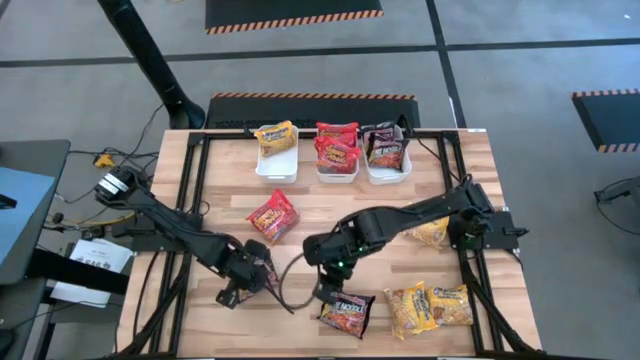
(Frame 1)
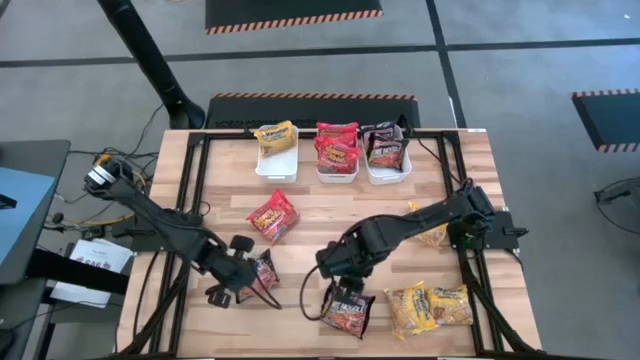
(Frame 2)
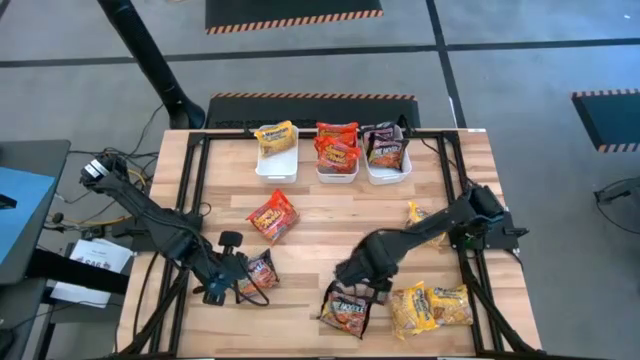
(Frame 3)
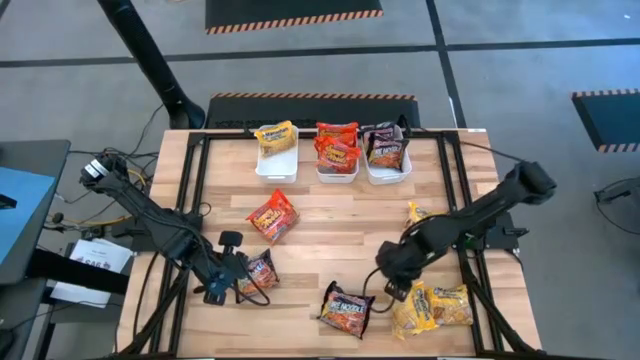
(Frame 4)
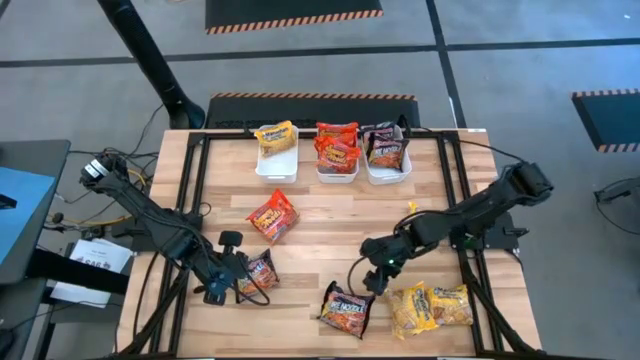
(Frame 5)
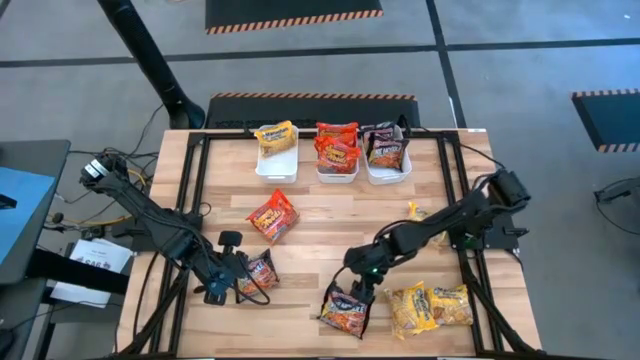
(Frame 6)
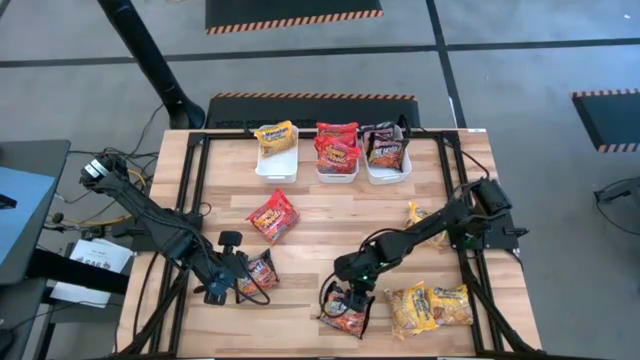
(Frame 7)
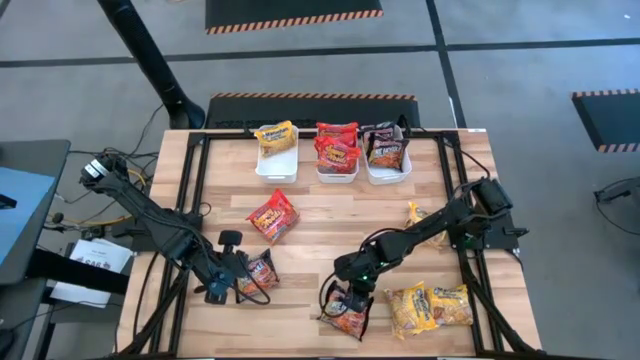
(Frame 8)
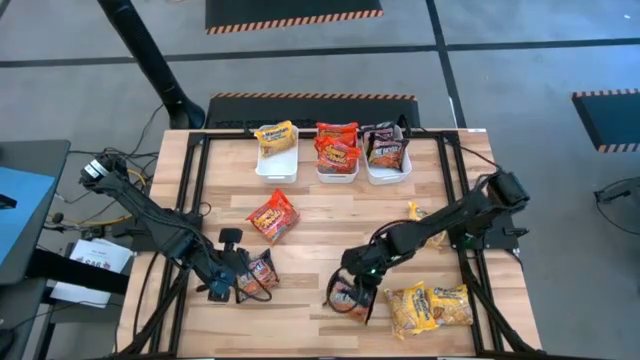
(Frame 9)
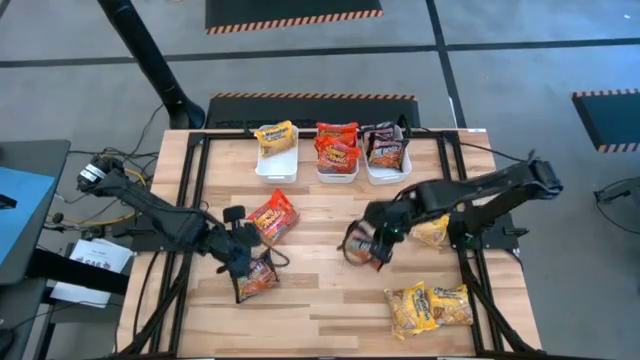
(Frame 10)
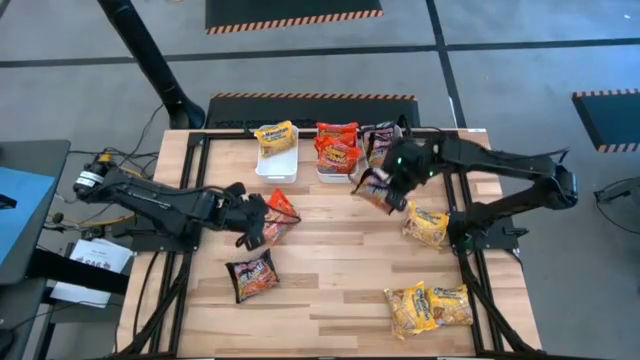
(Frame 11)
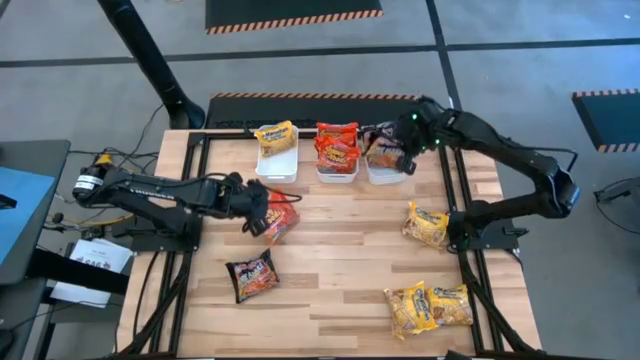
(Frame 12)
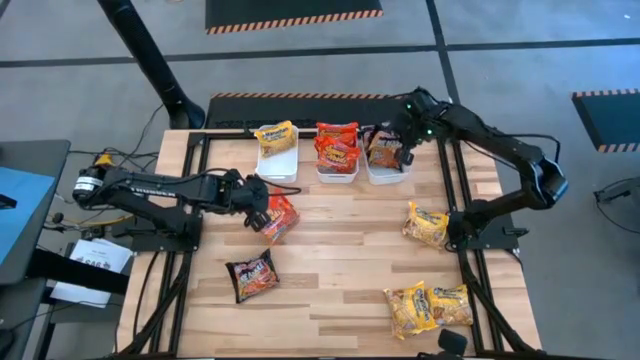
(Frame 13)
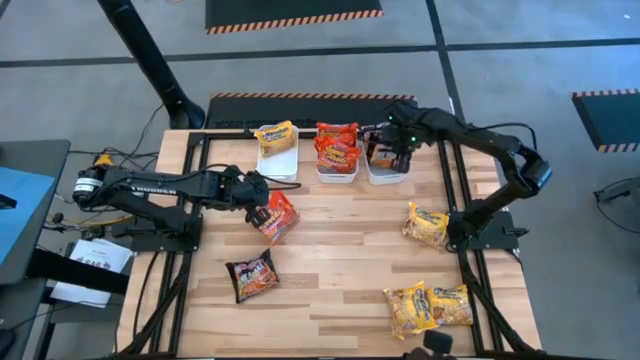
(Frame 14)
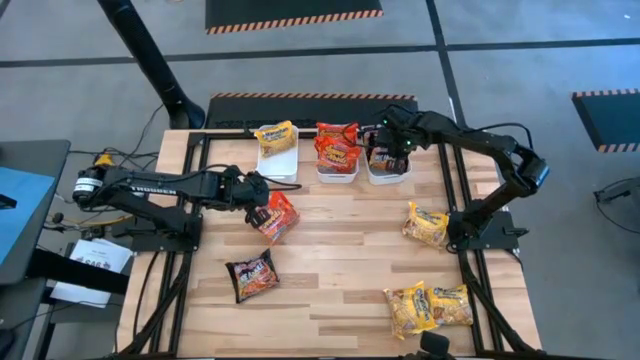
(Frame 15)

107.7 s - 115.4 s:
Task: Sort Maruchan noodles
Put the black noodle pack into the right white bin

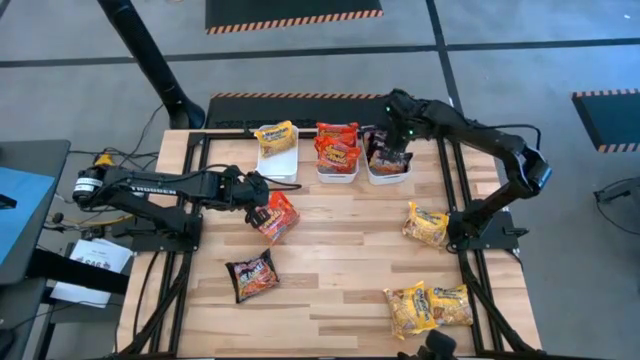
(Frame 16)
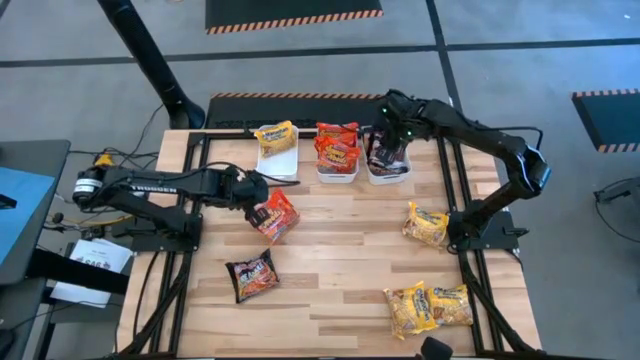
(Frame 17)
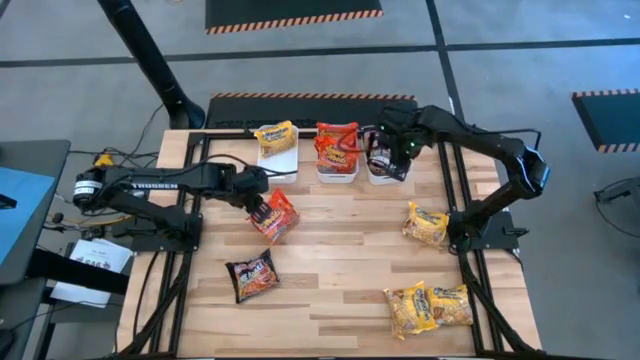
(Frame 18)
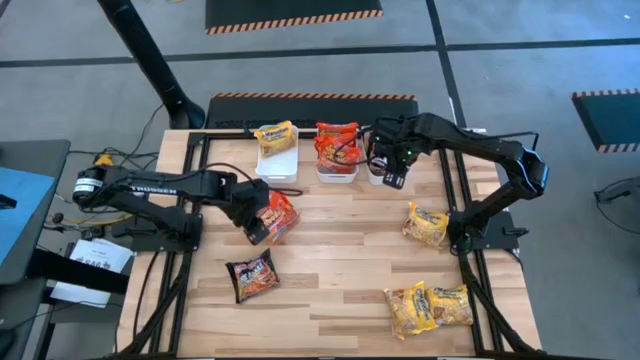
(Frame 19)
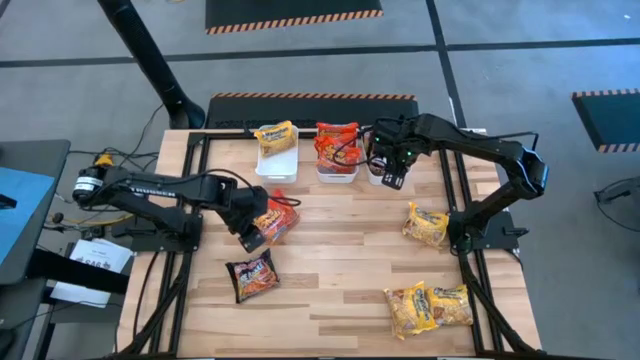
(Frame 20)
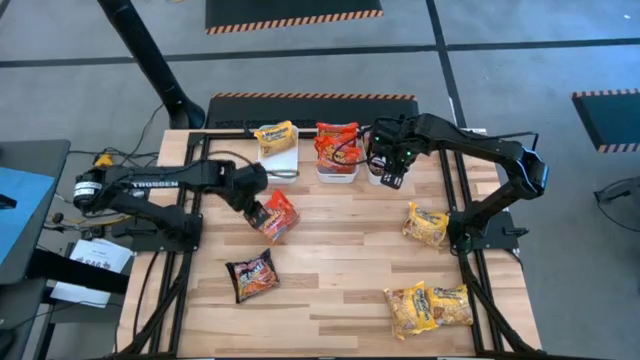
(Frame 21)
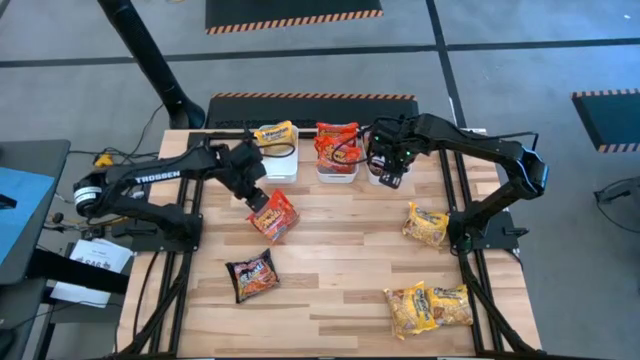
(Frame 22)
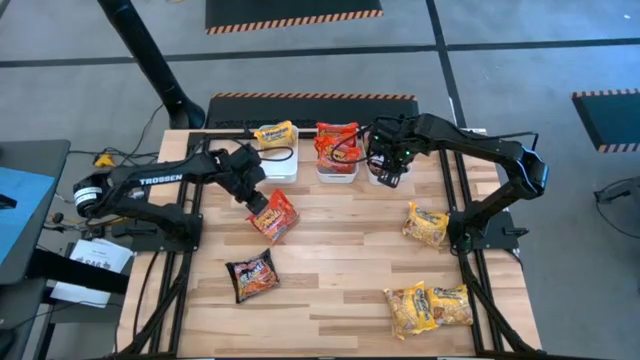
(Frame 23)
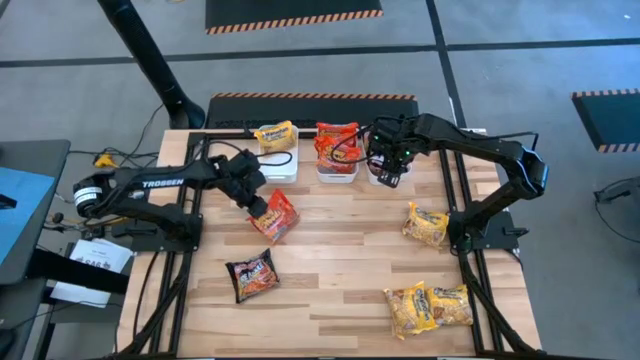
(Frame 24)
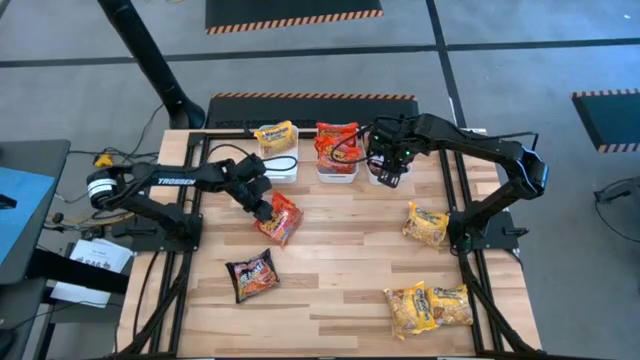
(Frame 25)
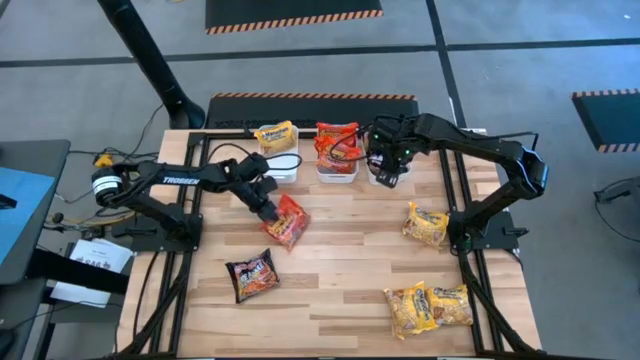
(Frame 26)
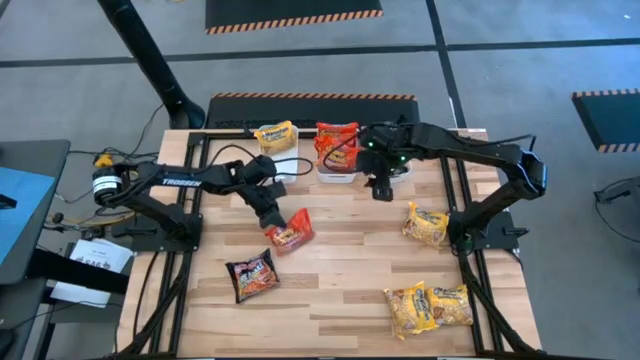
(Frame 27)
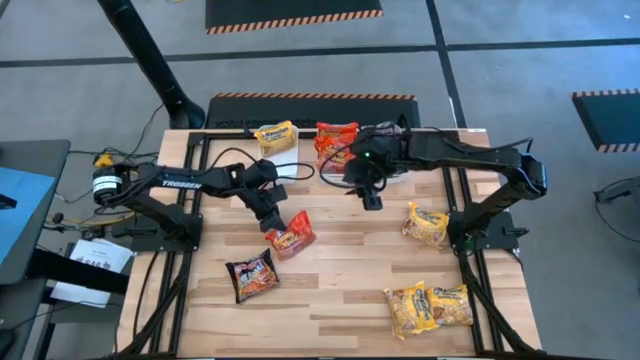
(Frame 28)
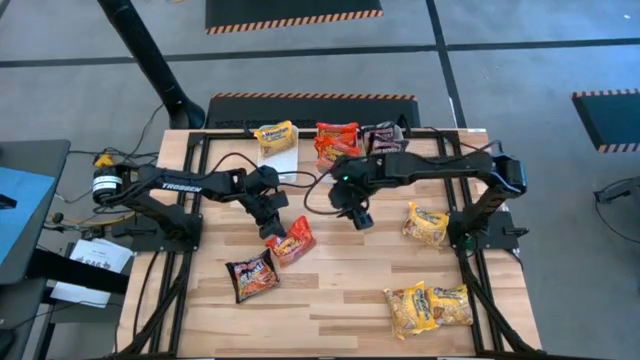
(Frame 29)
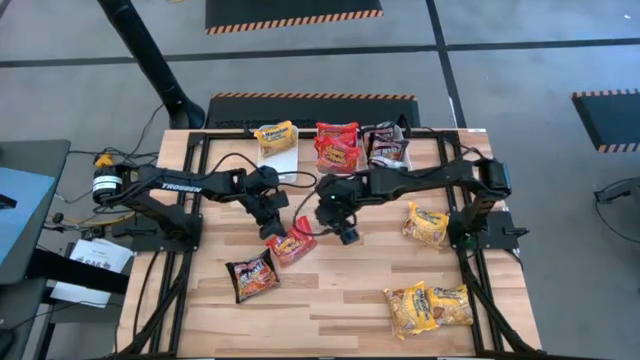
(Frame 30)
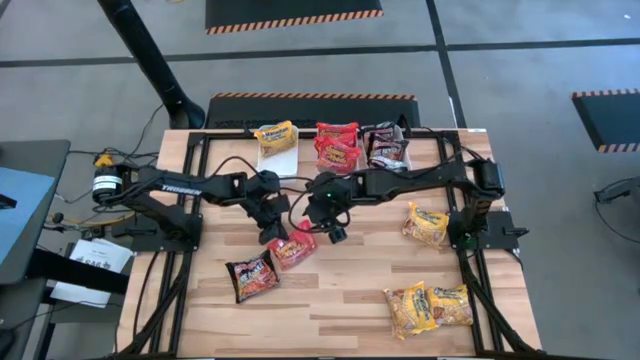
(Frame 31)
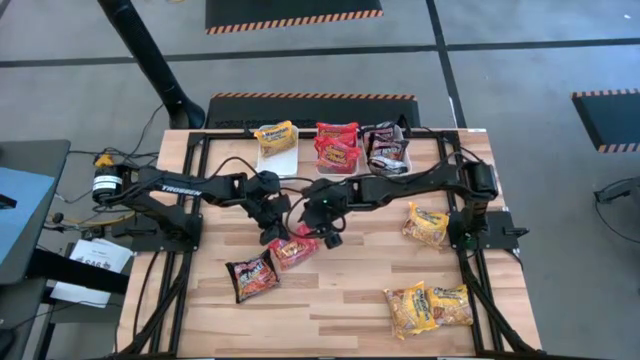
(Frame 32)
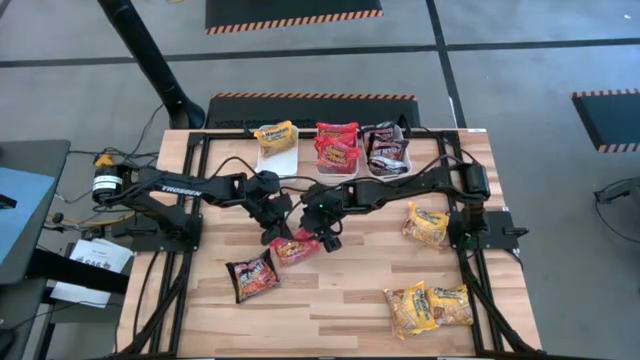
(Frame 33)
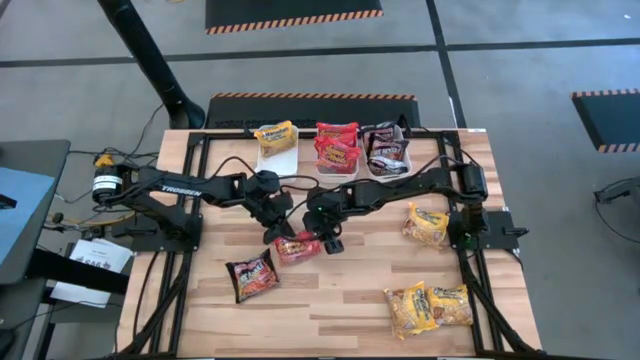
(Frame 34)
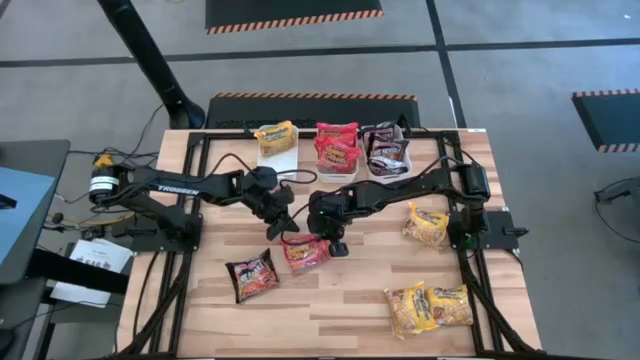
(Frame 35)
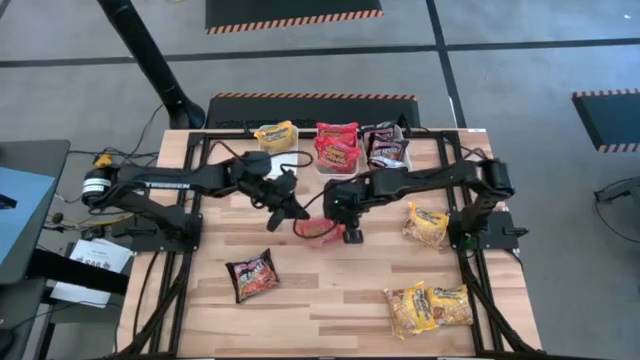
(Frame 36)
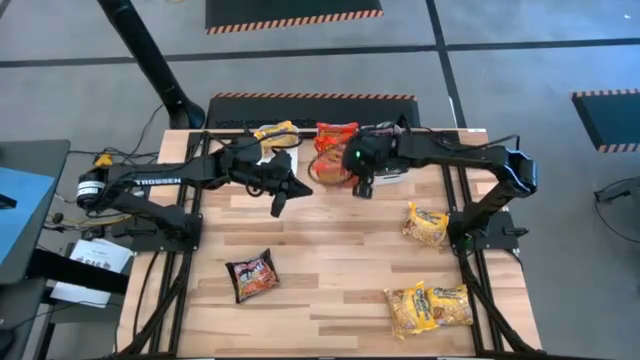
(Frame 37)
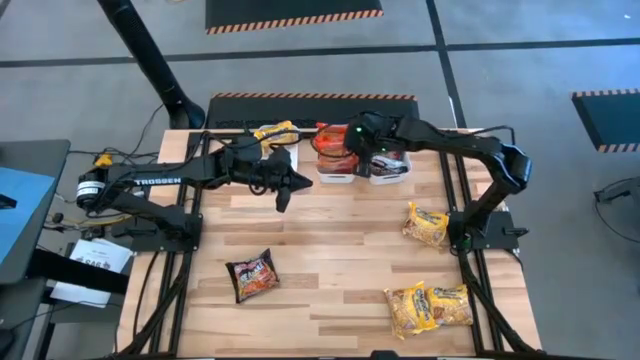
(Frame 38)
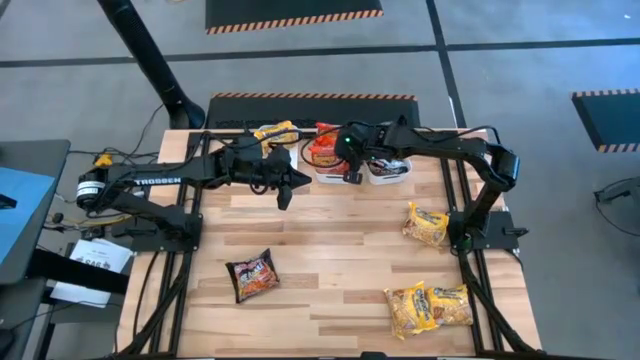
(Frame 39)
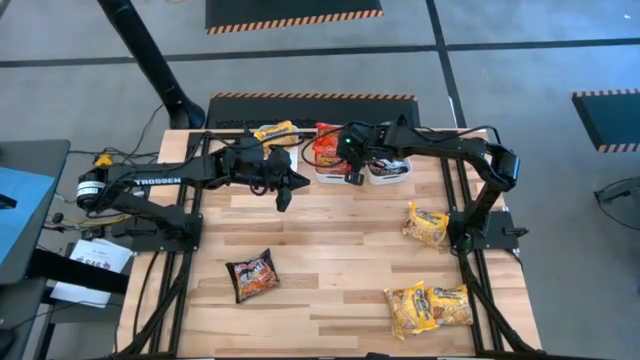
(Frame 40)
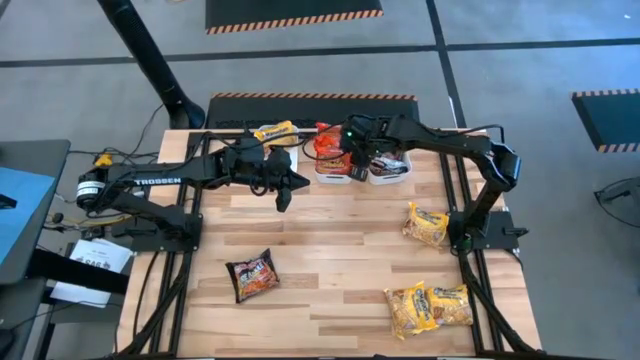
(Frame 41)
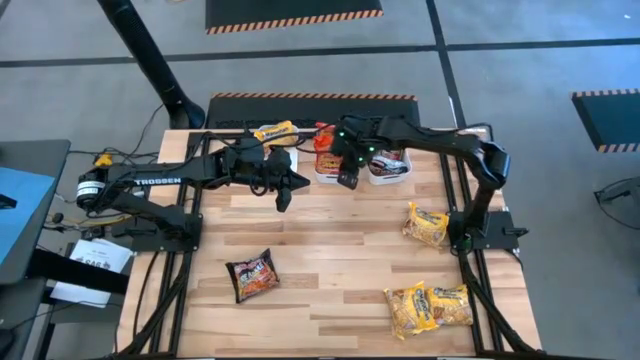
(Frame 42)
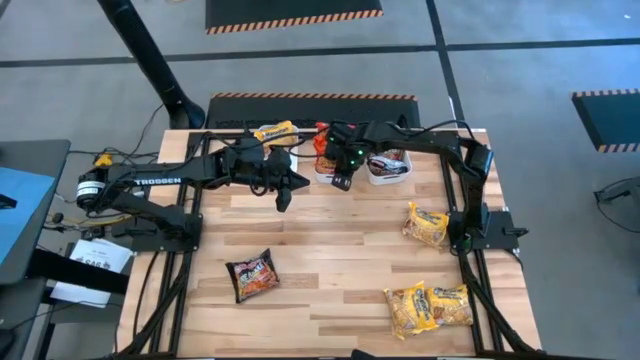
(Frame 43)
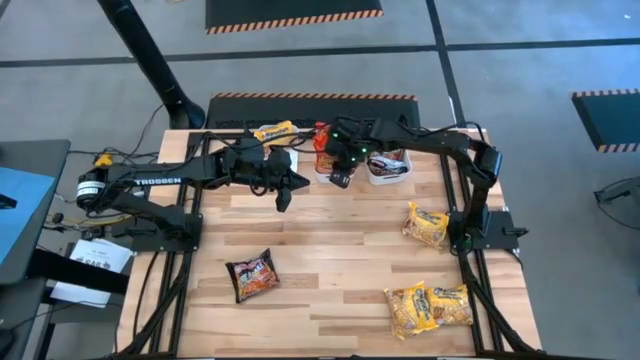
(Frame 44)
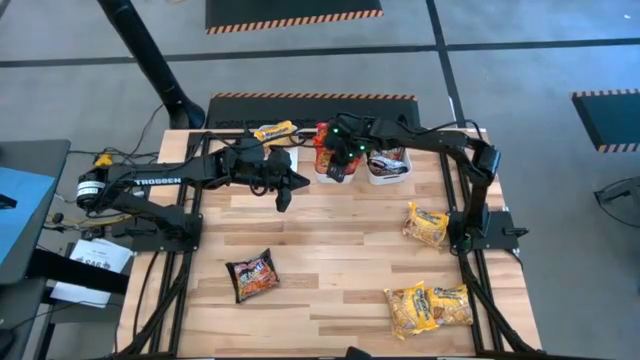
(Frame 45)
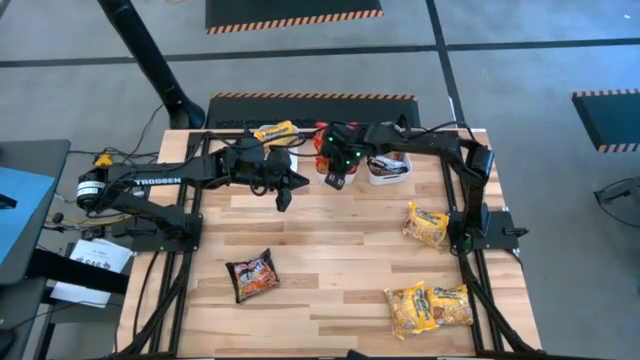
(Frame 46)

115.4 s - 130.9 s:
Put the orange noodle pack into the middle white bin
